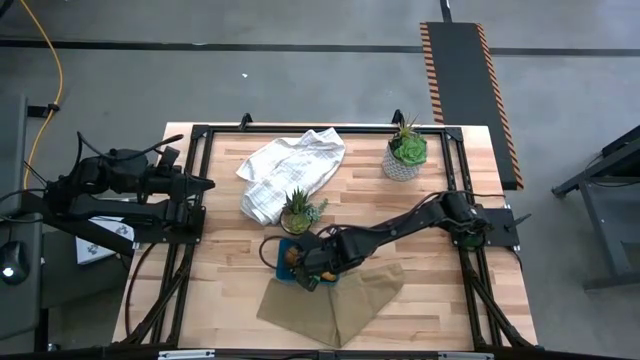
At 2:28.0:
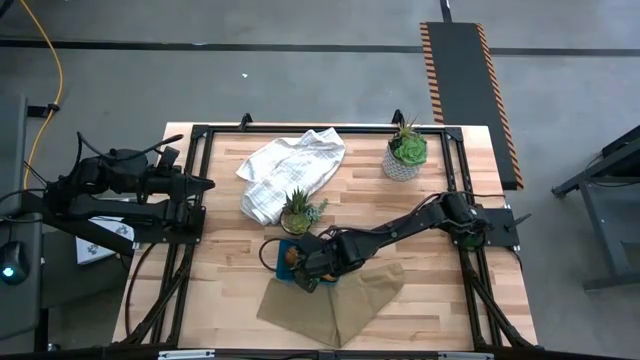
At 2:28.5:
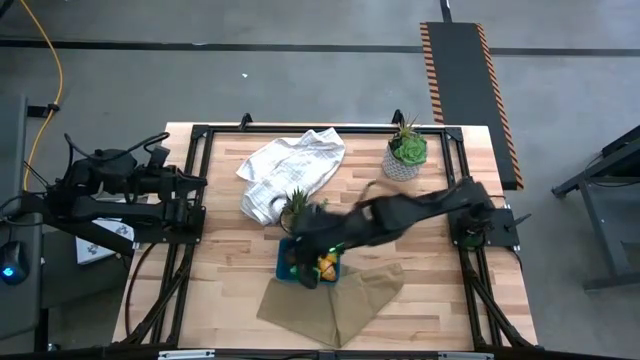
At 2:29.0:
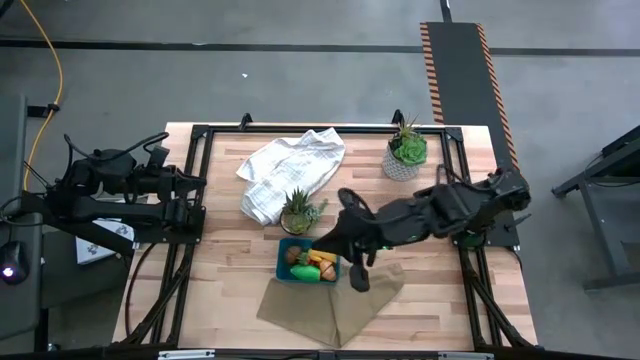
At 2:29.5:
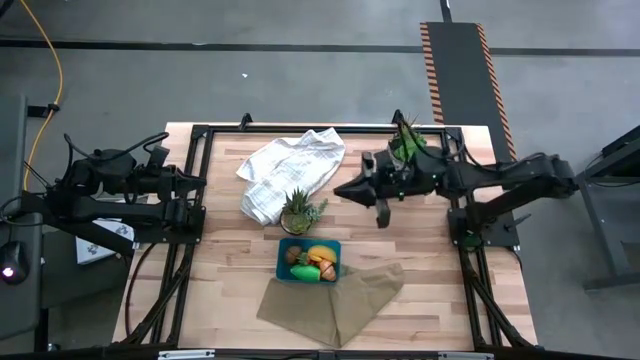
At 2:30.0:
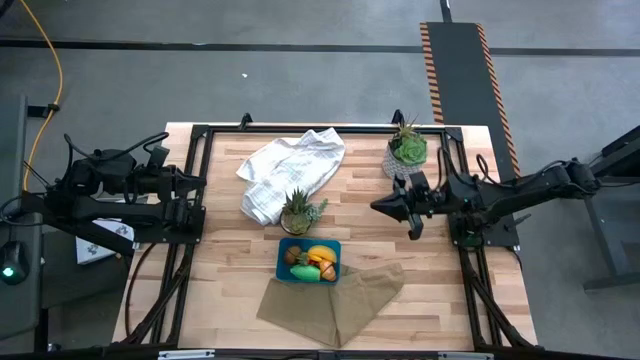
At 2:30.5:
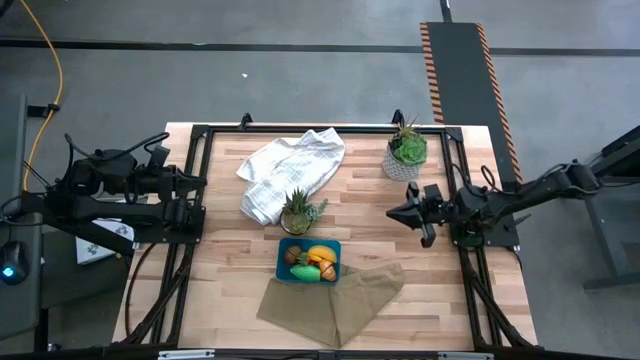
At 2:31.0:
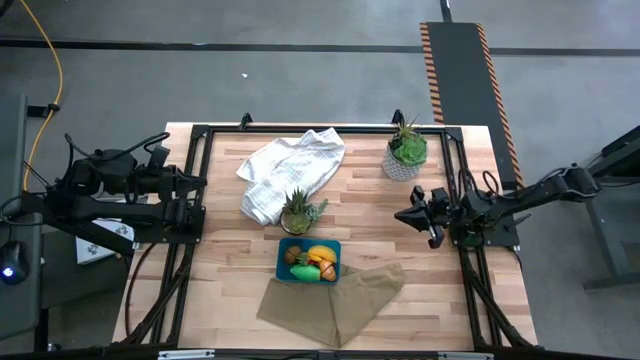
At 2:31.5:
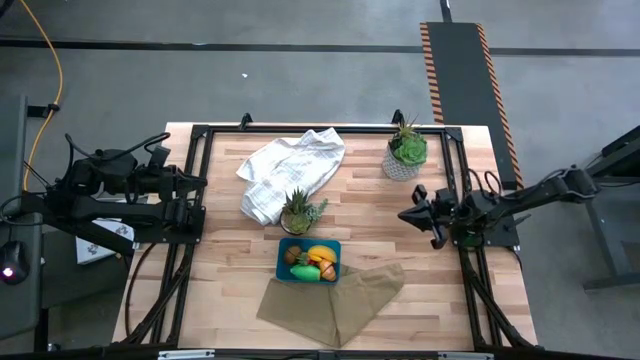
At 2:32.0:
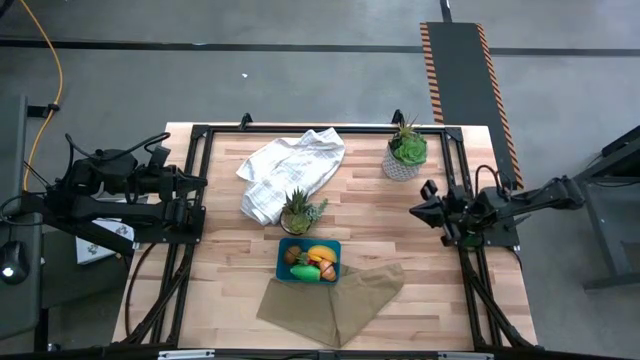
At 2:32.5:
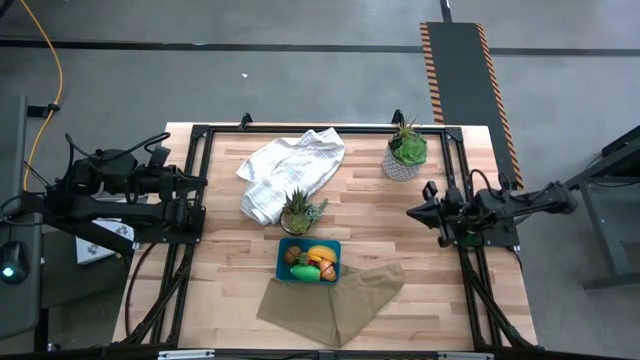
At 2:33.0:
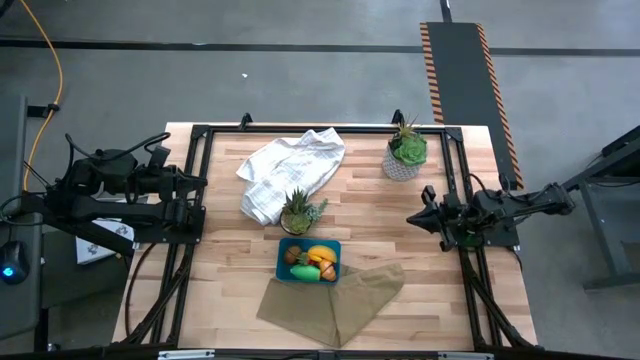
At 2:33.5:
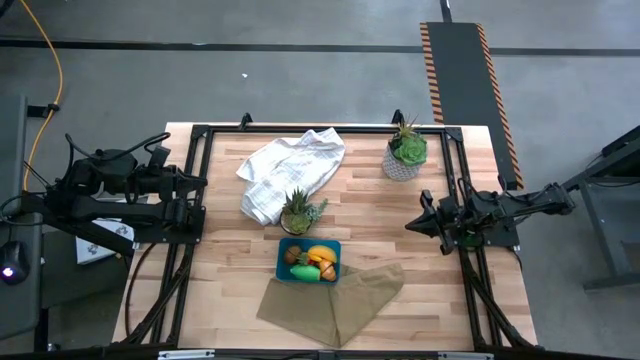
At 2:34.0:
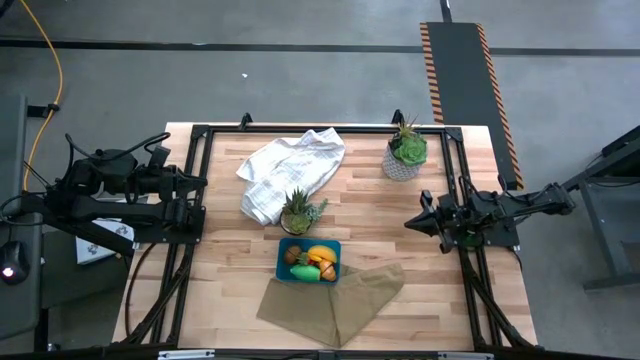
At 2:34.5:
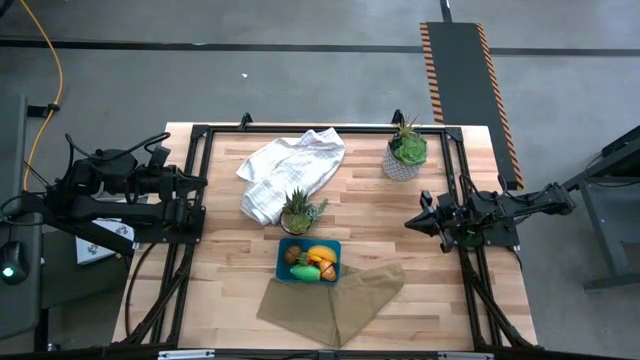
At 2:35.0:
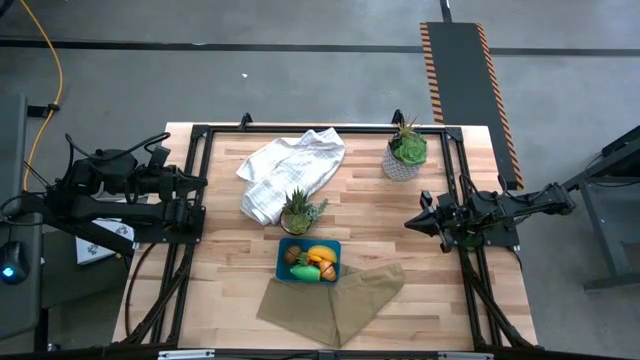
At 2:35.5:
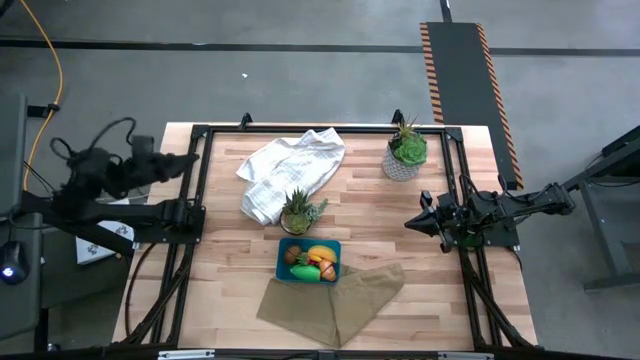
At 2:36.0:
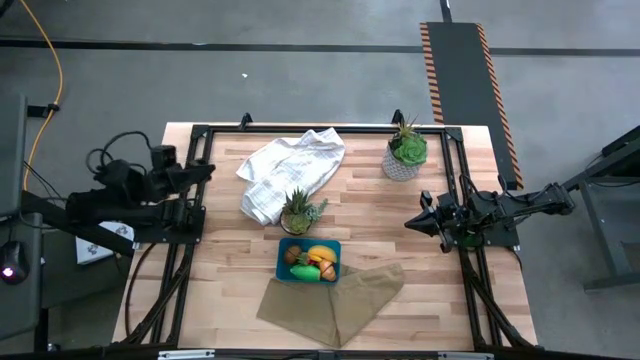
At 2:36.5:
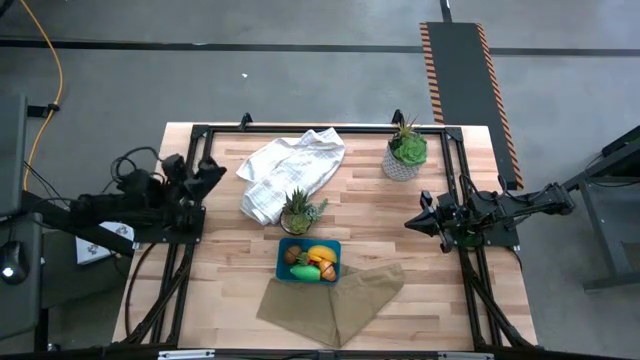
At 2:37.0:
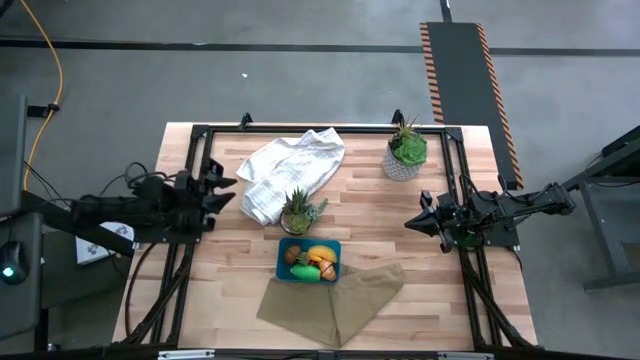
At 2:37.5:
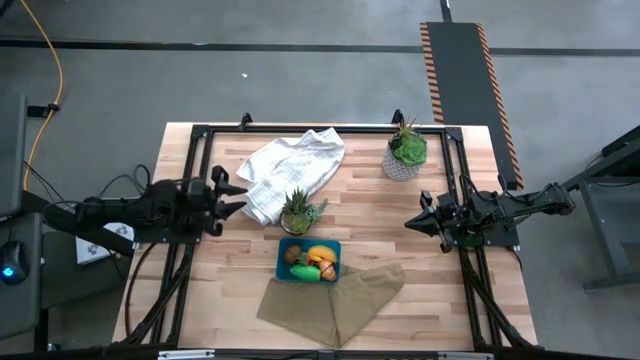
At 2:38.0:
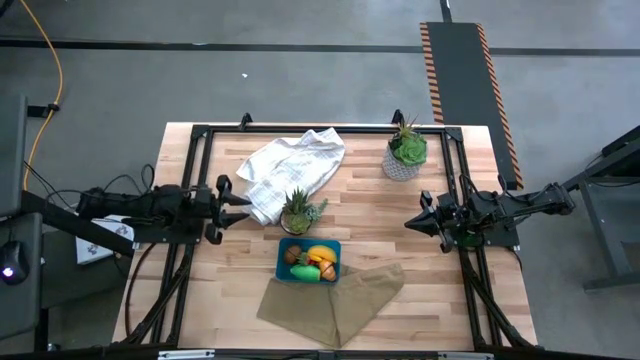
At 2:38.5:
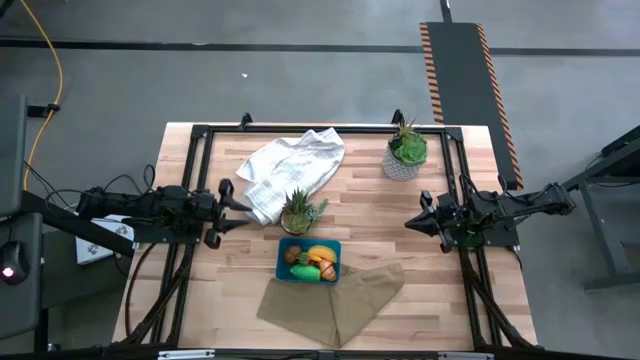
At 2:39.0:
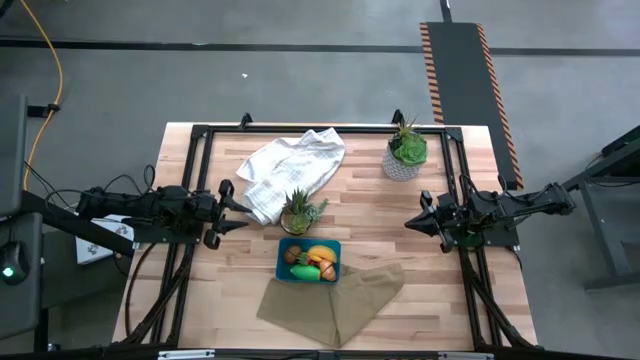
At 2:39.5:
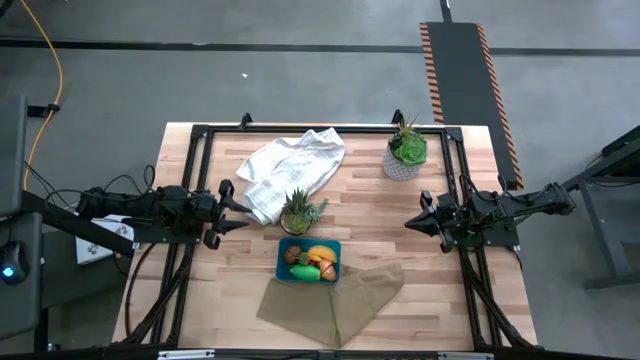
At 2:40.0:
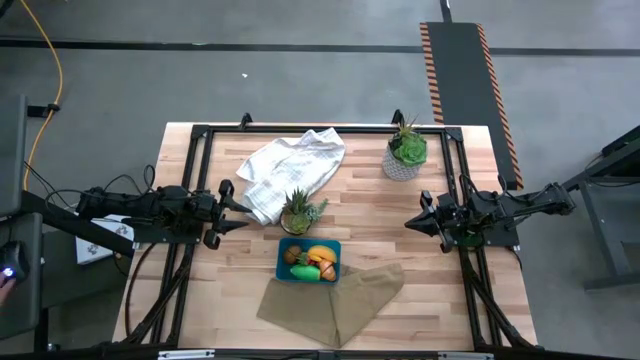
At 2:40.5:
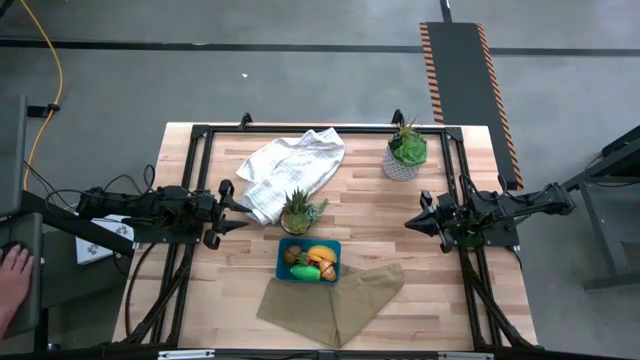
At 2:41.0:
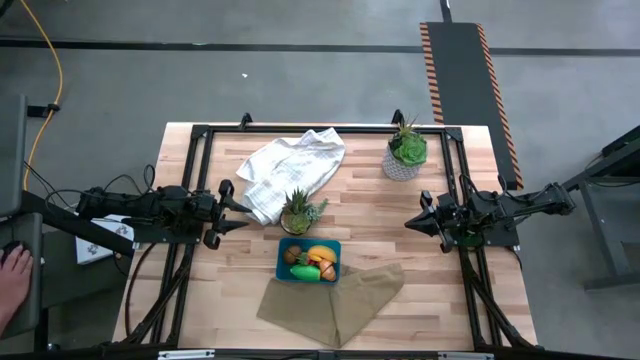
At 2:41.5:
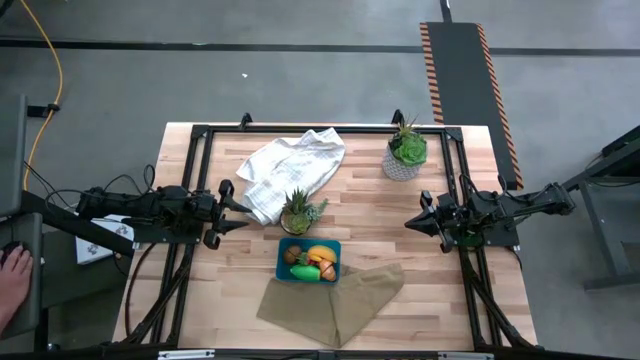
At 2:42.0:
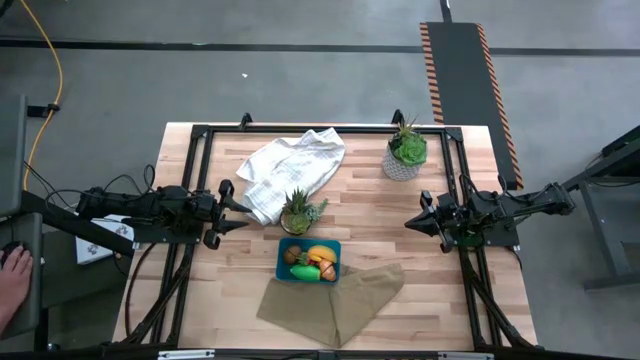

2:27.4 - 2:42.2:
Task: Pick and placing Produce into tupperware
Return to Home Position

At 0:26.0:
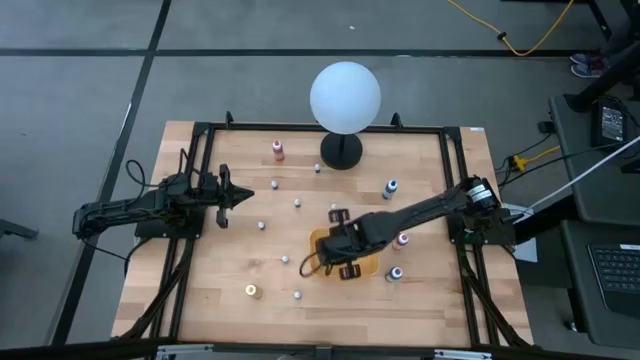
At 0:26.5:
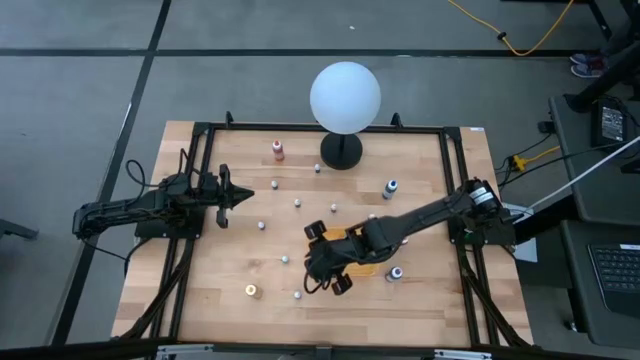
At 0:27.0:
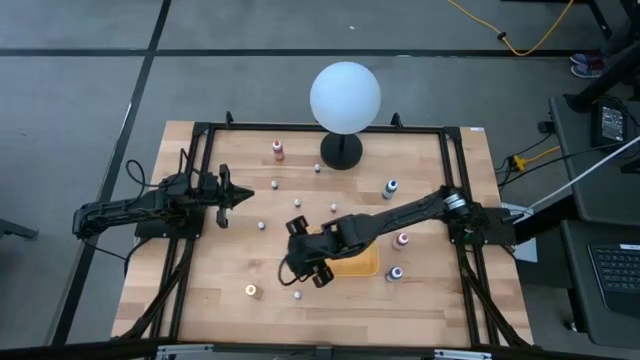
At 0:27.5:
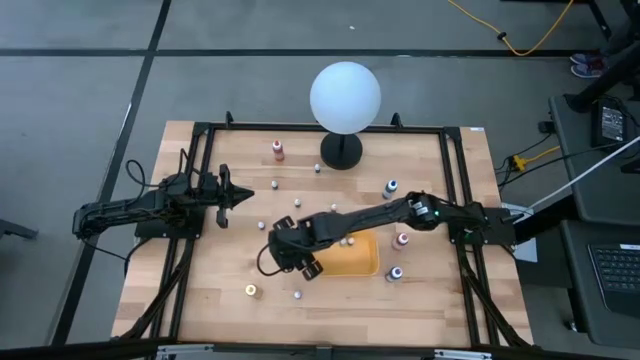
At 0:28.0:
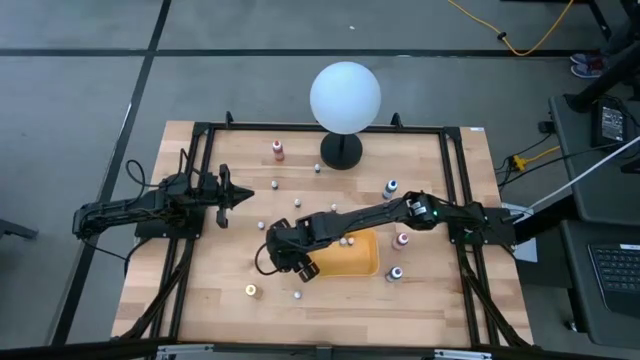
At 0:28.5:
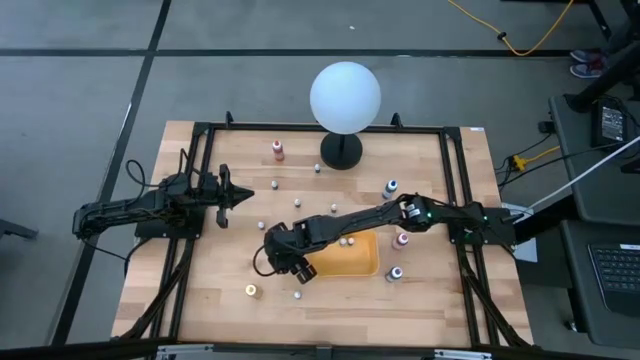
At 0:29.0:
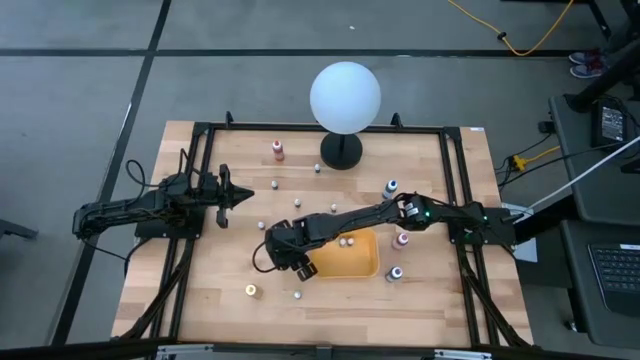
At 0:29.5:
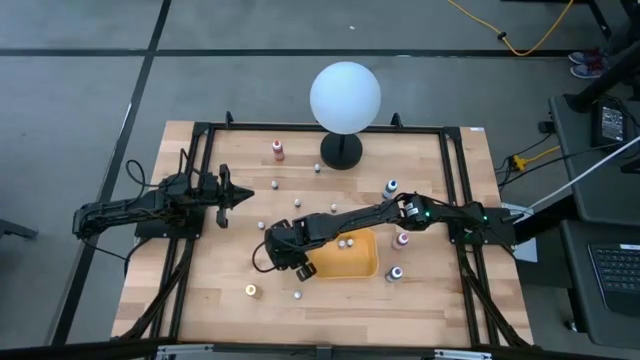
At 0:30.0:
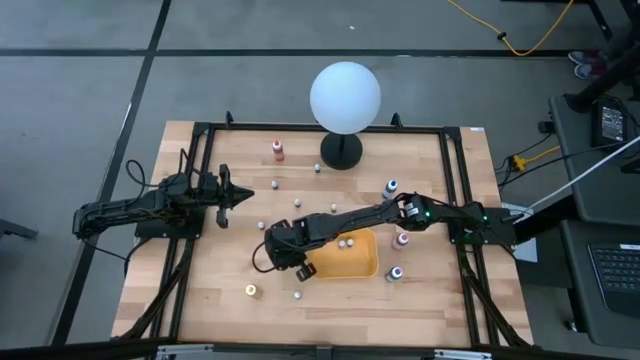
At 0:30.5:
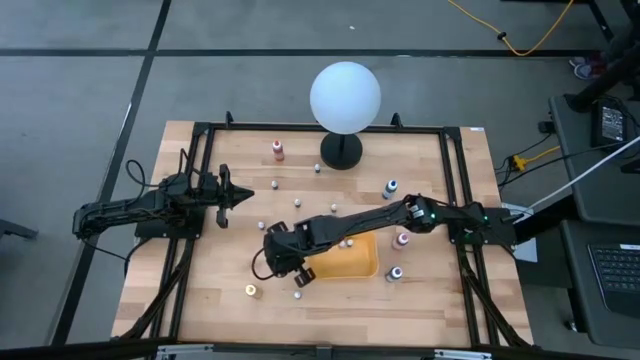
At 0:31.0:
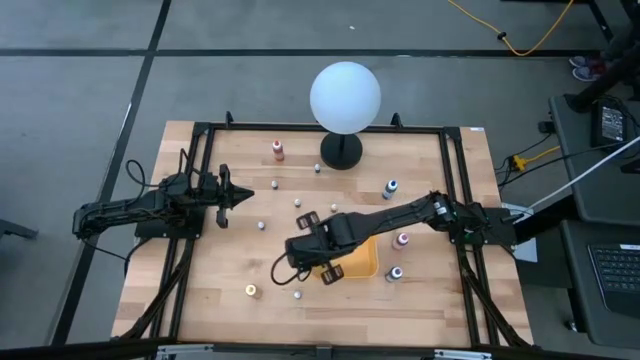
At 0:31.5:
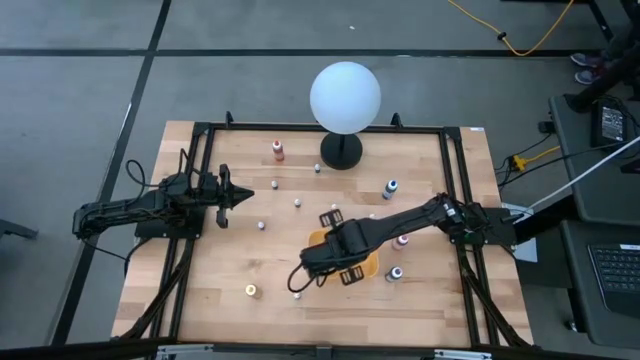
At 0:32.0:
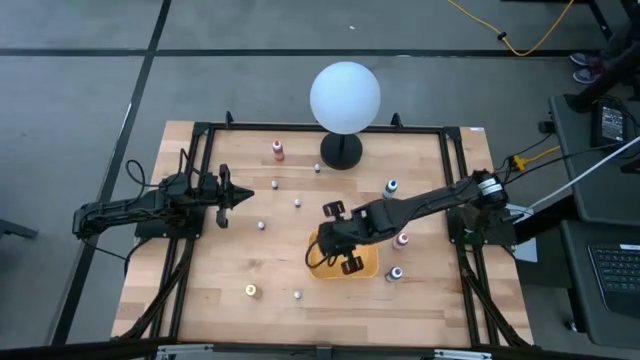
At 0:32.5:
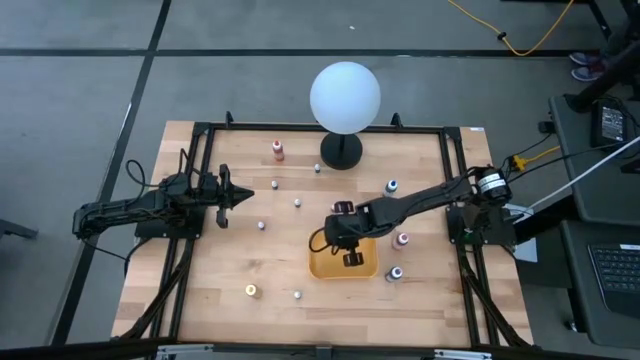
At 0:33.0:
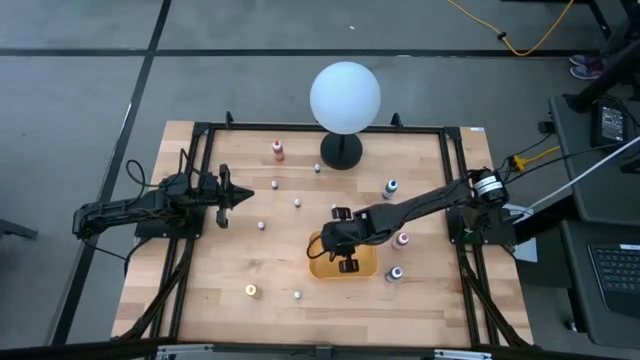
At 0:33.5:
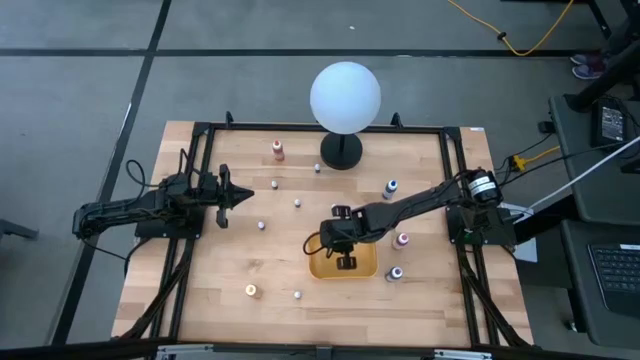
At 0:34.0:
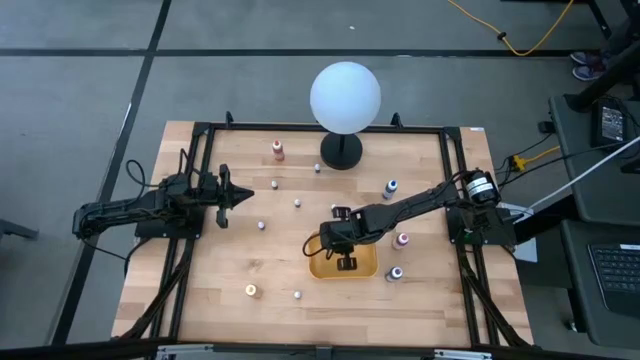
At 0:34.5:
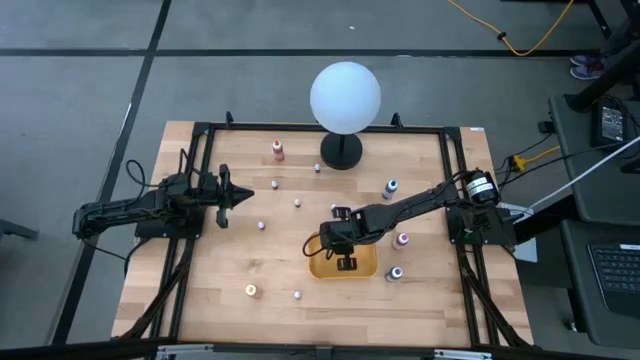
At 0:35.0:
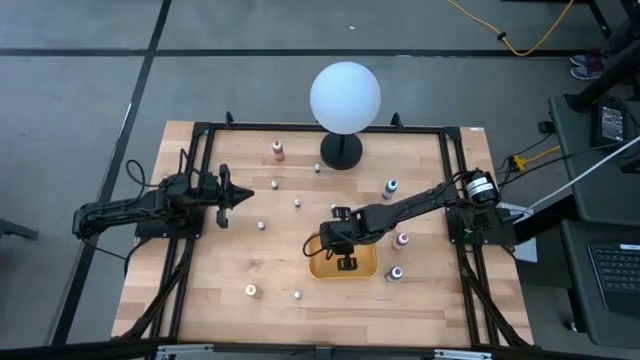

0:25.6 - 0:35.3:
Task: Pick & Place food coloring
Put the small blue food coloring bottle into the yellow bin
